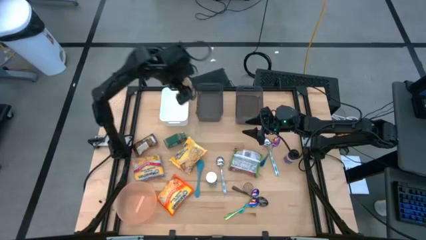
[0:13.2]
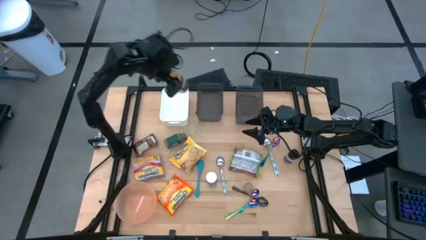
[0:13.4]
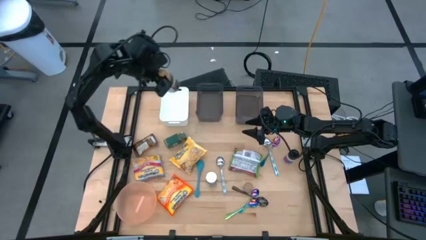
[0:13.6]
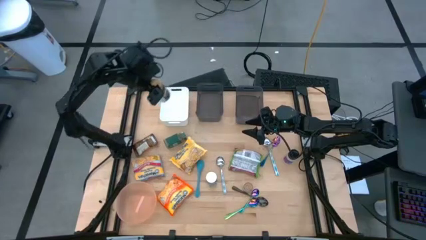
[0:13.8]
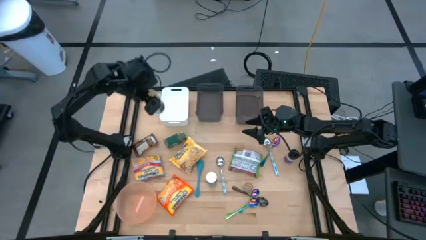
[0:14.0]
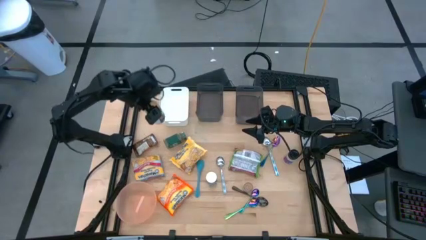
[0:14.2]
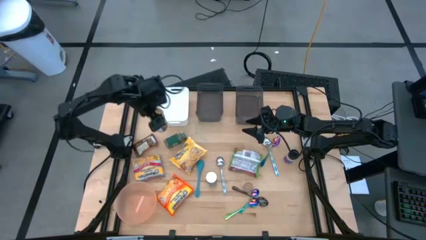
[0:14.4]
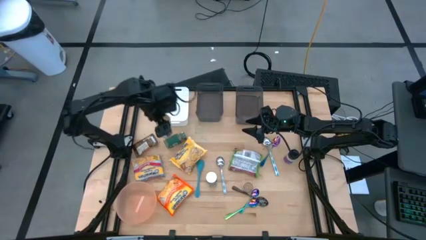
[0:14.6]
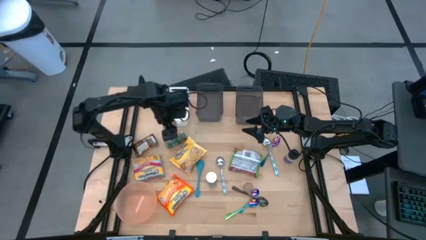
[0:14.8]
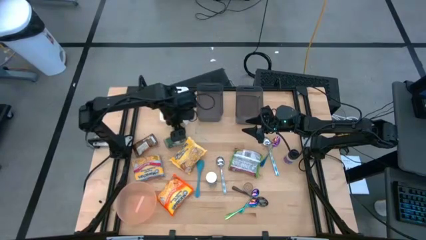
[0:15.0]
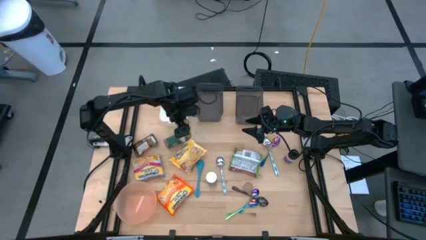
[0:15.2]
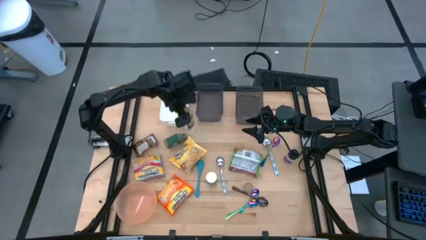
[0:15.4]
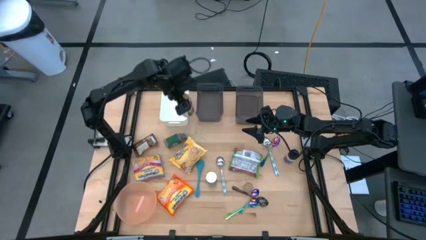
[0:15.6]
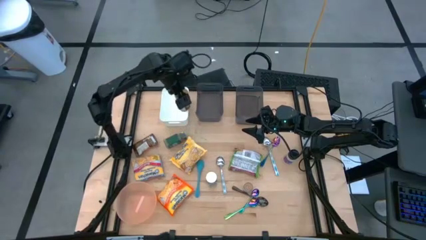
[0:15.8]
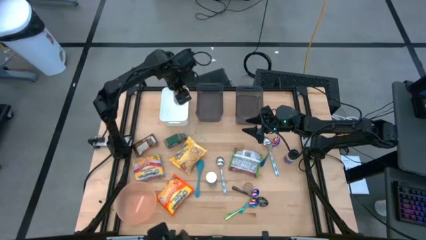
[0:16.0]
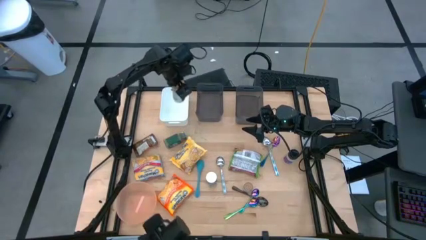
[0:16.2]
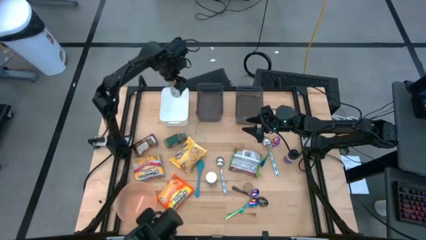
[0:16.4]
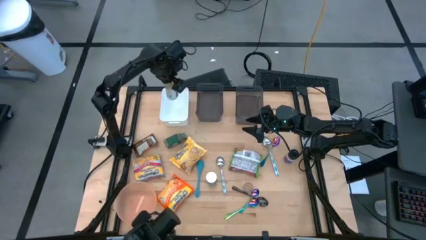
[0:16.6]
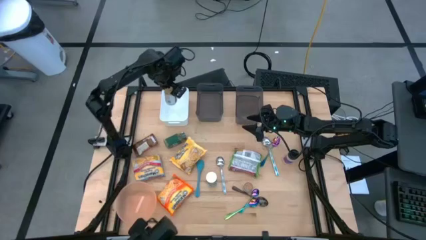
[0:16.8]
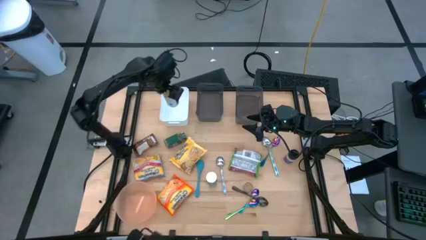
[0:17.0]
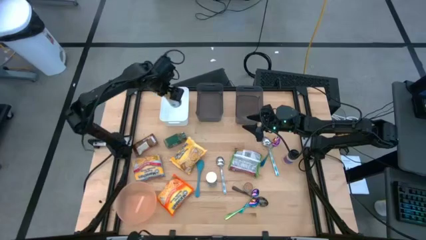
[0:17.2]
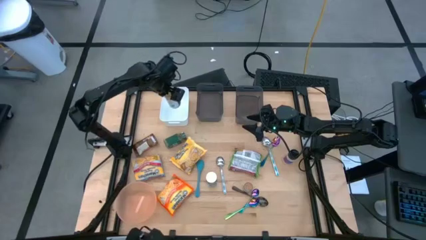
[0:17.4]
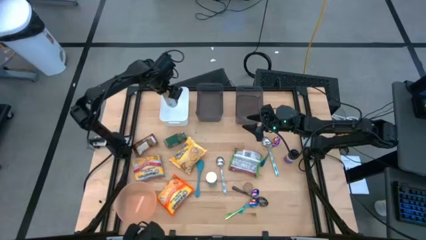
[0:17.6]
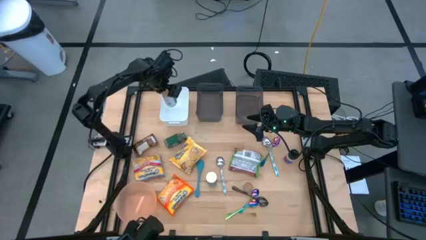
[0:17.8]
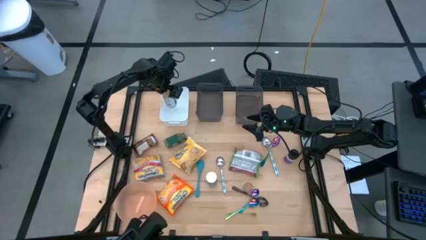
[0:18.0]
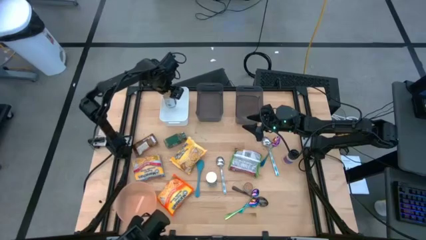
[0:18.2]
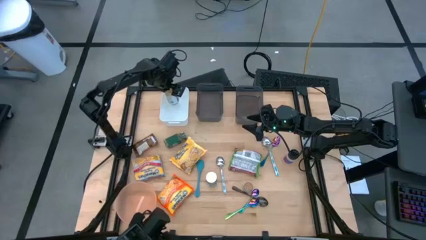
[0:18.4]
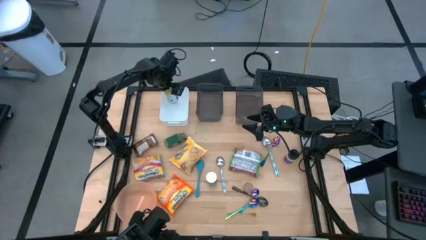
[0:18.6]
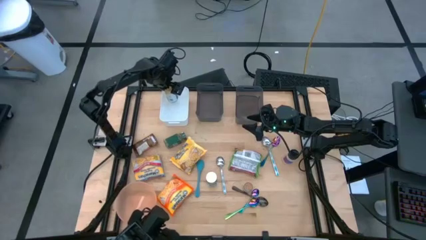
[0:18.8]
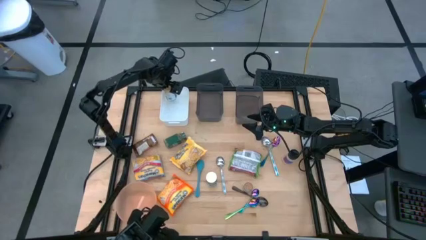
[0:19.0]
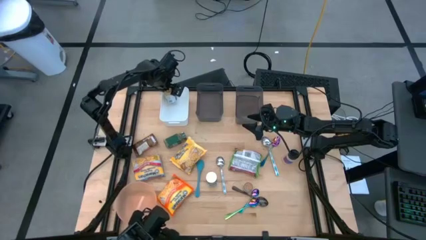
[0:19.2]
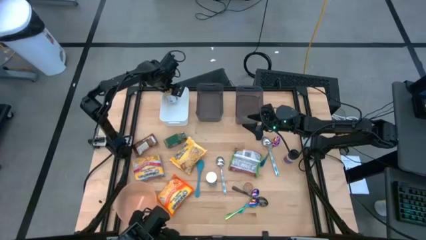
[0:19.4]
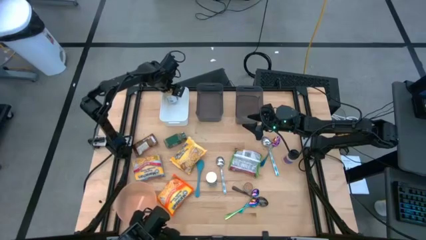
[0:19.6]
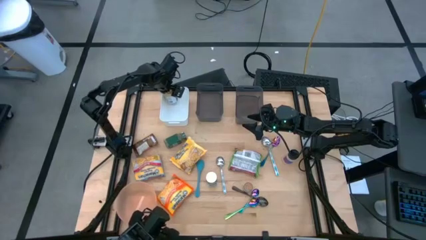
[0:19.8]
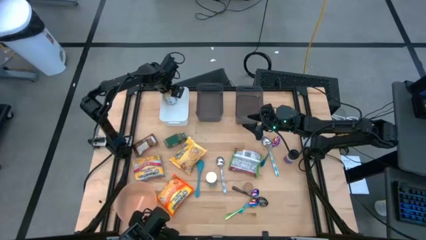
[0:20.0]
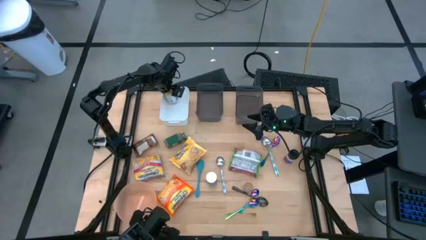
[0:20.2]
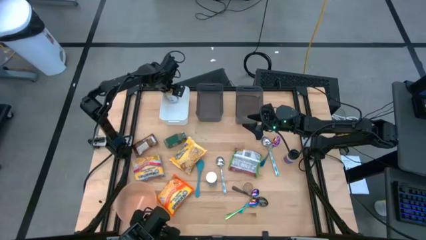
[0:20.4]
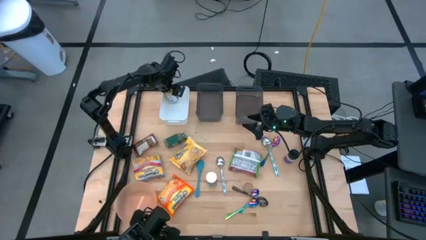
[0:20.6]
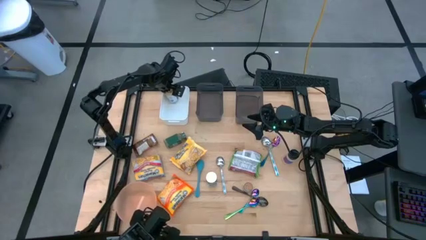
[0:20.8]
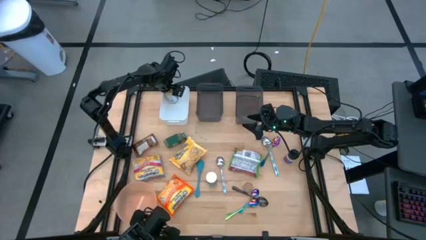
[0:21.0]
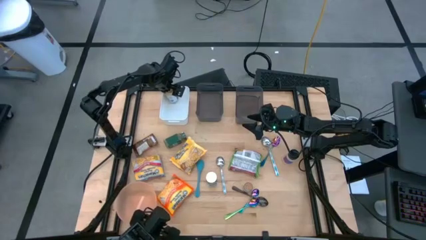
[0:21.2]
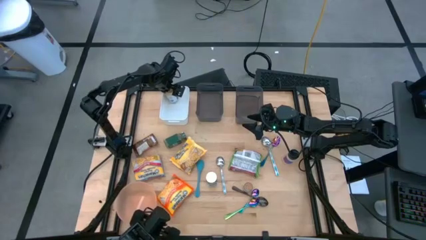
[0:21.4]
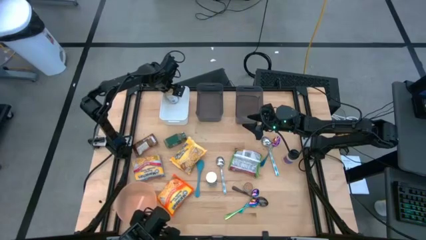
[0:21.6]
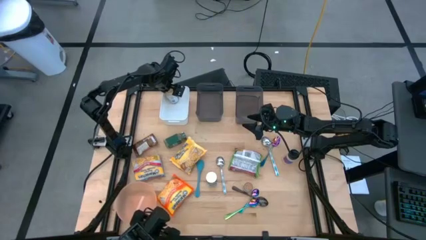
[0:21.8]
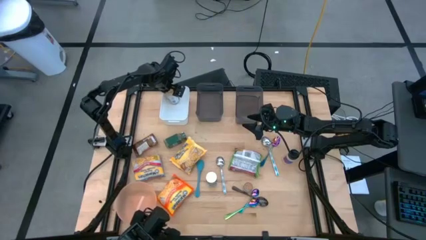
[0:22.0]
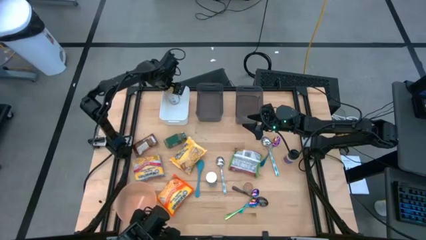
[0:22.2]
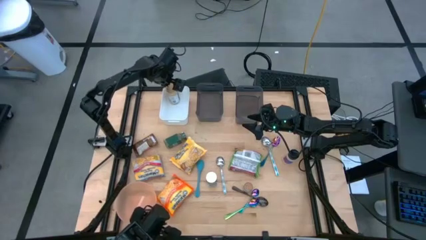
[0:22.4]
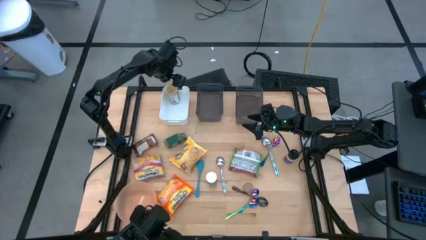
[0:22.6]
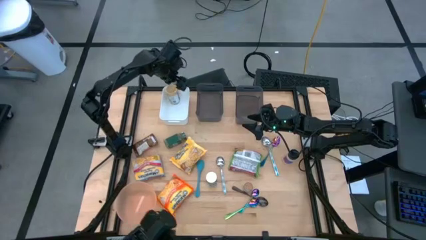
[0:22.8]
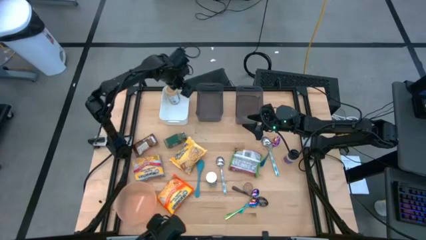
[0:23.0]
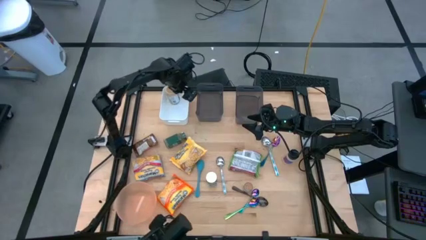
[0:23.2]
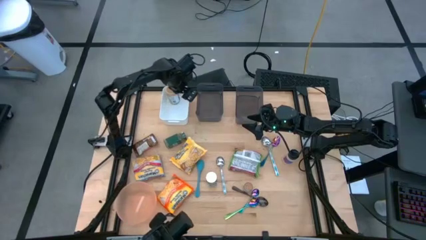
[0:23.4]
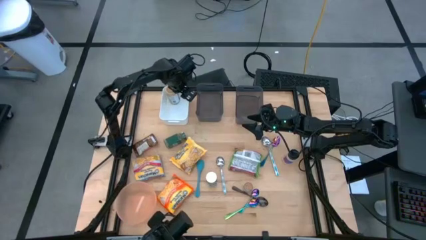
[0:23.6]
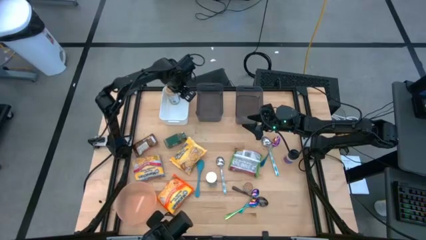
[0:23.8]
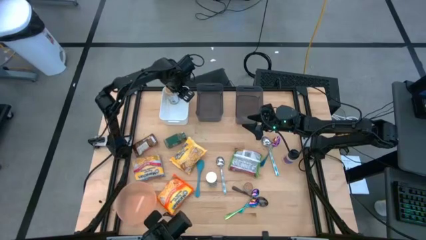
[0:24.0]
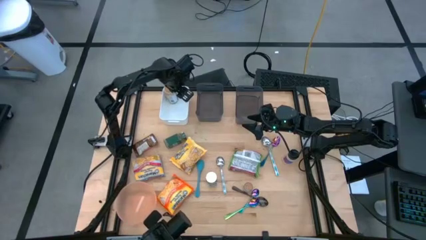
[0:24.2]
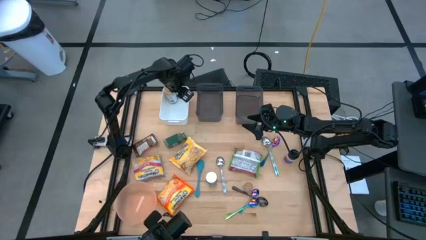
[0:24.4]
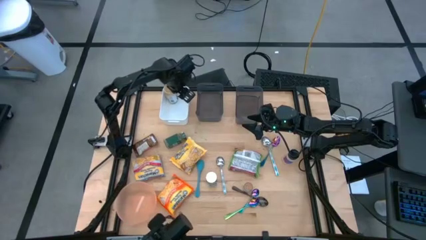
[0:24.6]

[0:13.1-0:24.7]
Task: Pick & Place Food Item
Put the golden seasoning bottle into the white bin
